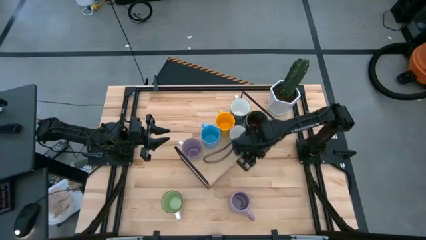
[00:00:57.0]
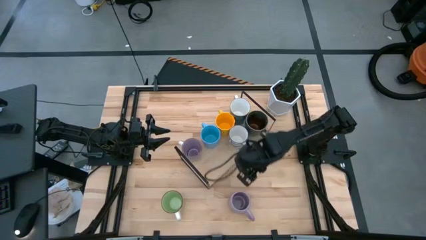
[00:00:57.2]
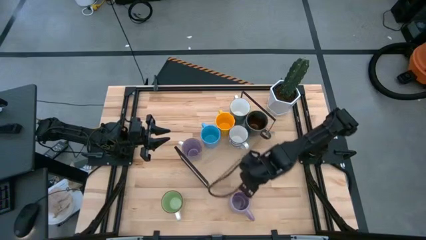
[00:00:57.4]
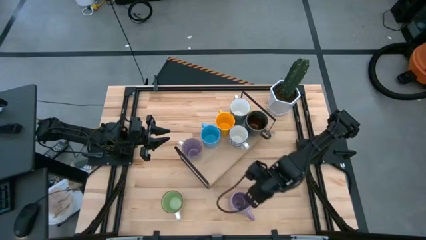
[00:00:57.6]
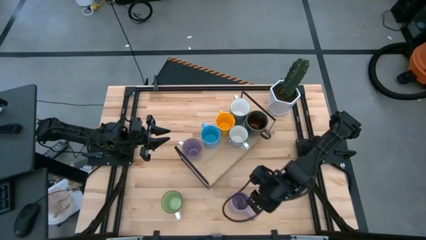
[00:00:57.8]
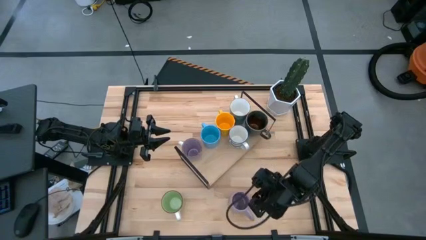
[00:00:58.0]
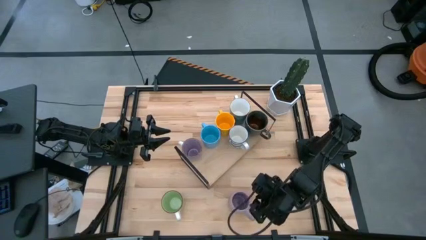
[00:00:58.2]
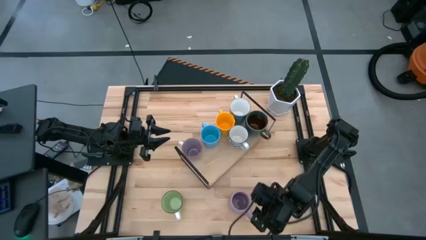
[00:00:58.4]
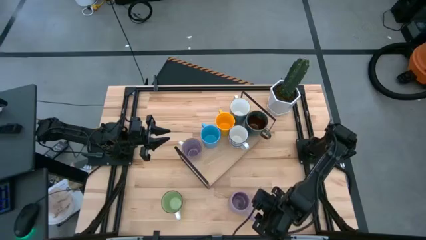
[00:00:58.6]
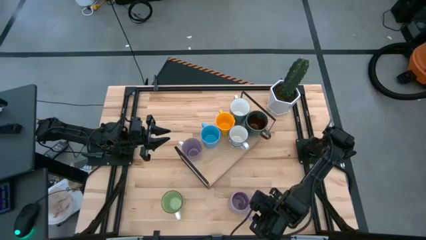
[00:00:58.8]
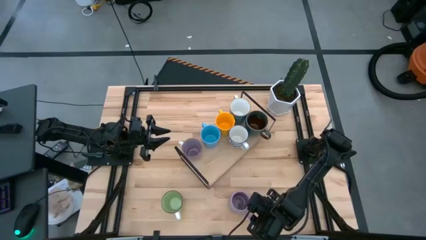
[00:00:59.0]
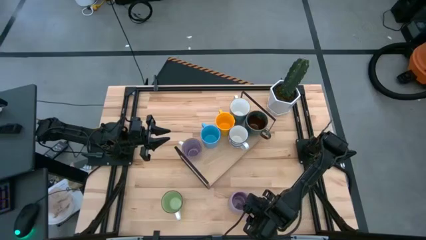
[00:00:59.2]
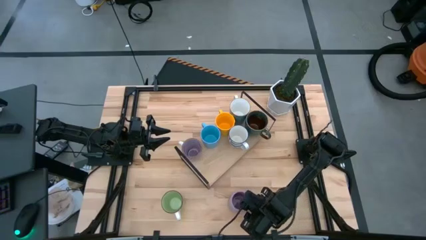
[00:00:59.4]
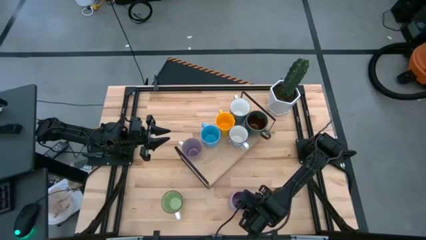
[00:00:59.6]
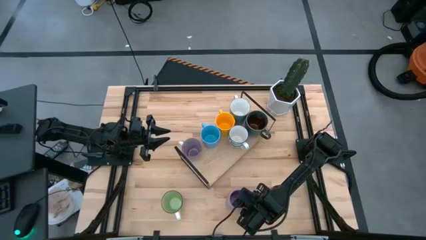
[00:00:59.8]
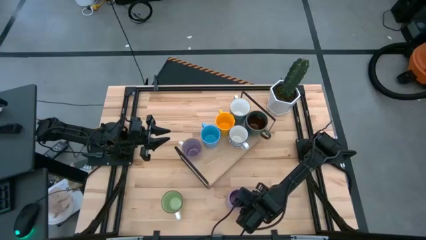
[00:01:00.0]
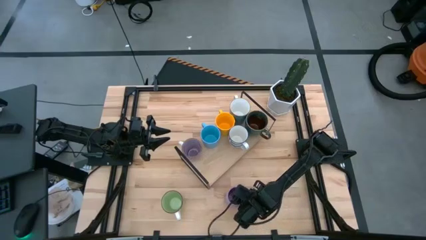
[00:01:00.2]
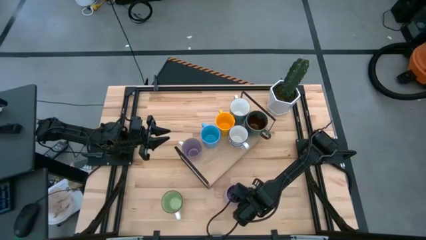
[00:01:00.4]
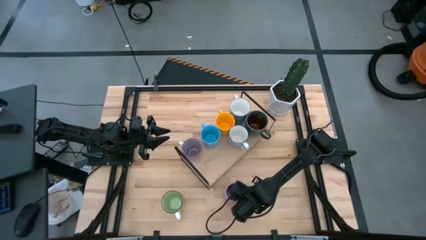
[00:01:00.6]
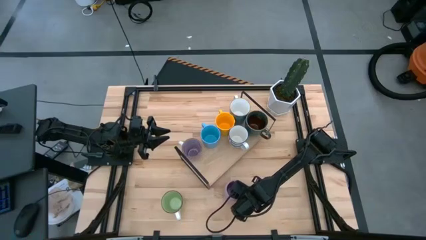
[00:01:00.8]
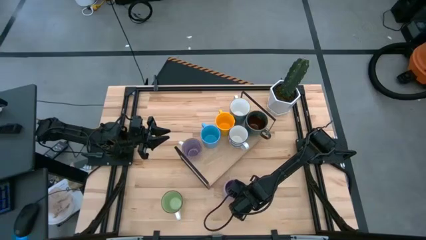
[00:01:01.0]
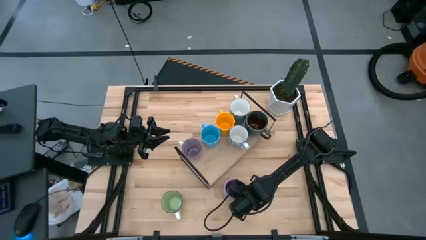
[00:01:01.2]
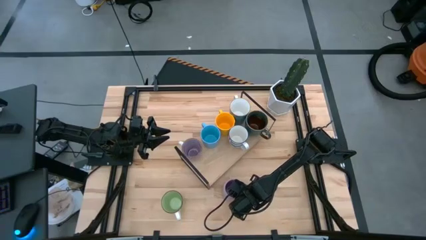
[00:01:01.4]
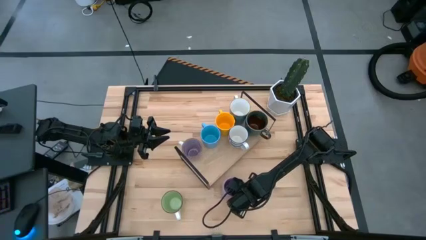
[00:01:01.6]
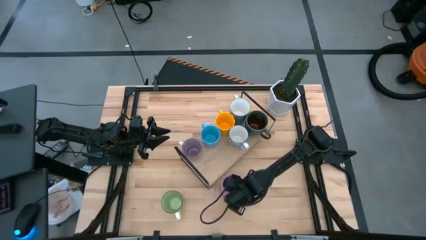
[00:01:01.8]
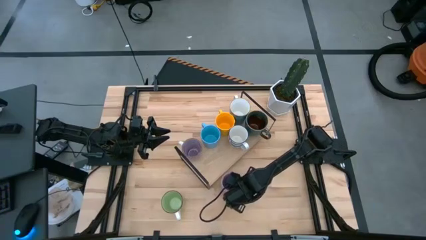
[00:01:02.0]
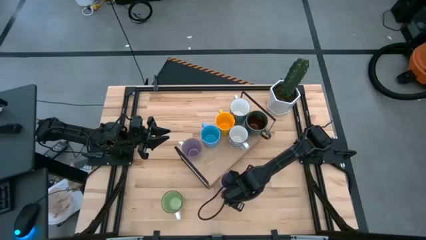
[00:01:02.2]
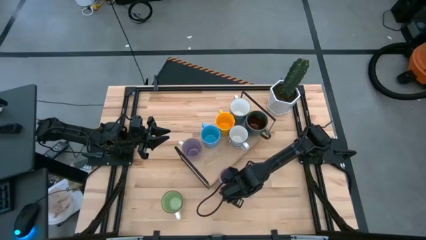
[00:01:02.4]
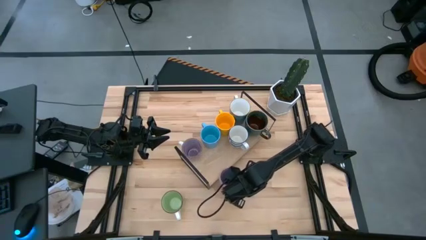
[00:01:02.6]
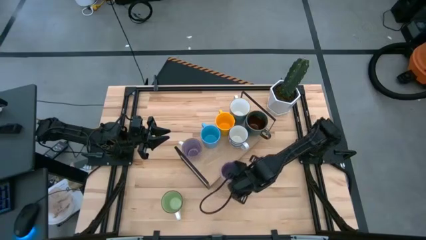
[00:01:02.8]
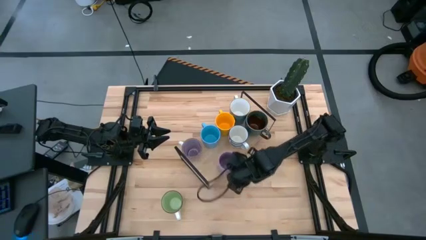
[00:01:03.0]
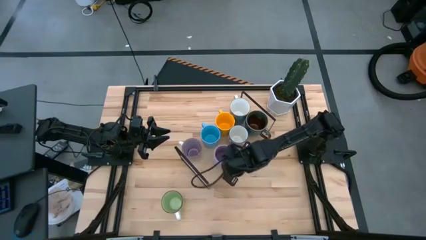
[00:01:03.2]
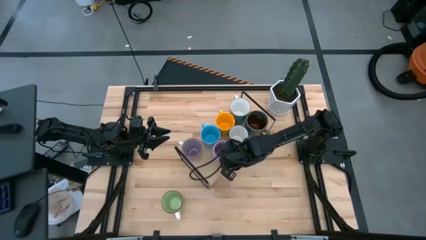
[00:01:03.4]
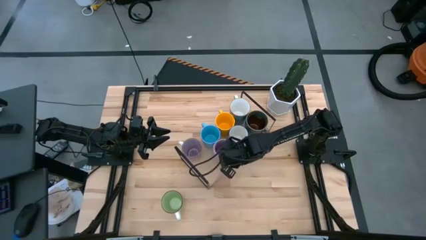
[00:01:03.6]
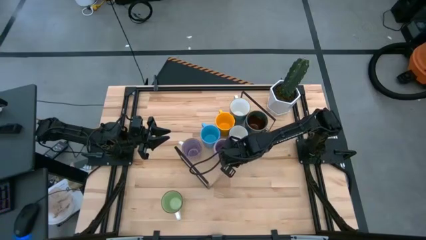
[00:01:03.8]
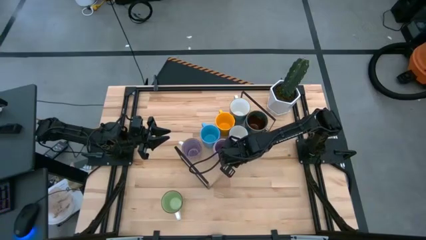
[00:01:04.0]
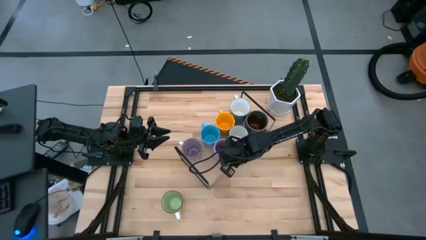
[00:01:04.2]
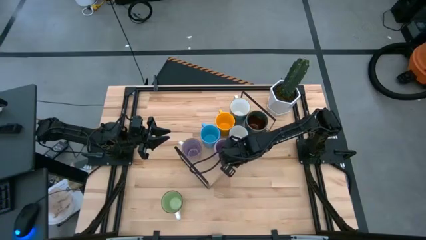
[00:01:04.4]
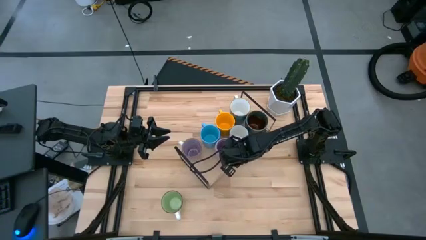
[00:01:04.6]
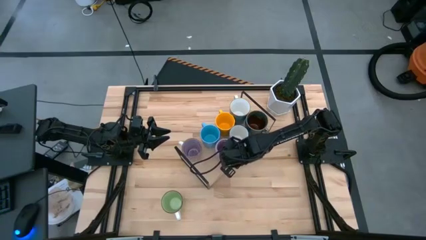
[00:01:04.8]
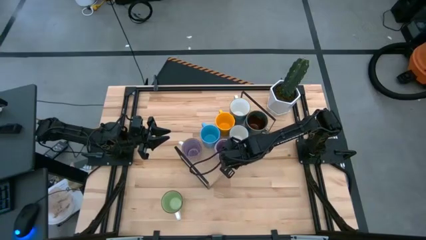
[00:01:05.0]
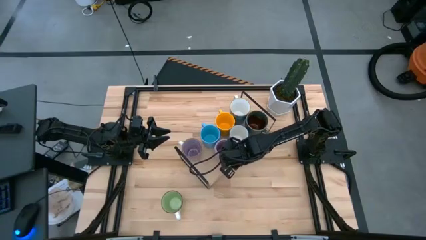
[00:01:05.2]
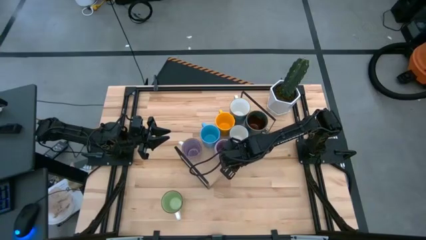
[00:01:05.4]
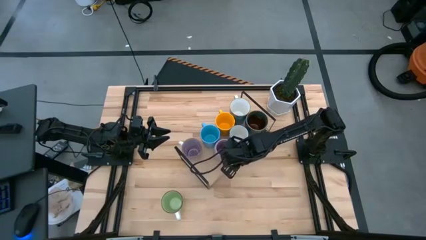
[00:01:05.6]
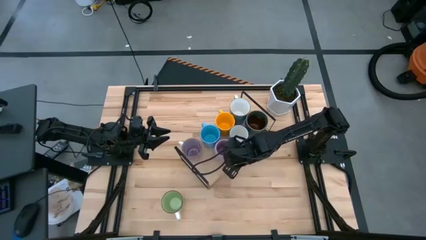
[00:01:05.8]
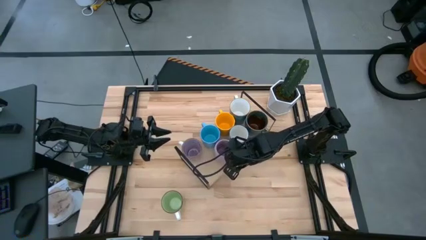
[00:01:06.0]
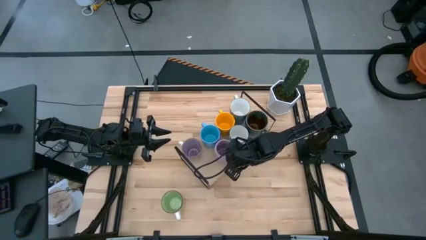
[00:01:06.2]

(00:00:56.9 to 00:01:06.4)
Task: Place coffee mugs
Put the violet mug on the shelf

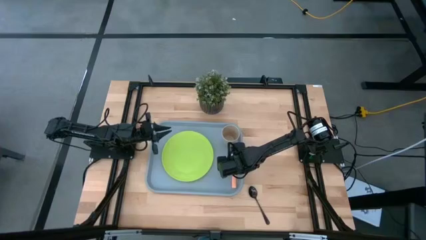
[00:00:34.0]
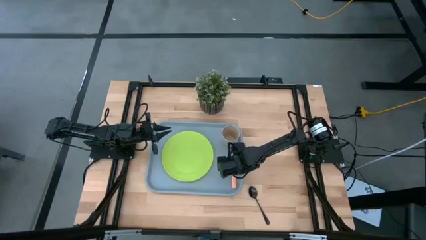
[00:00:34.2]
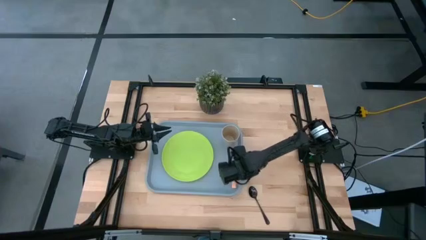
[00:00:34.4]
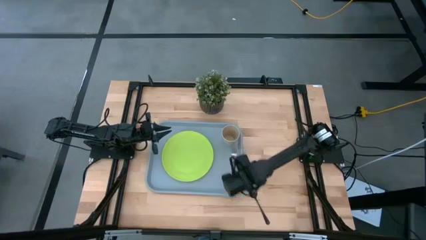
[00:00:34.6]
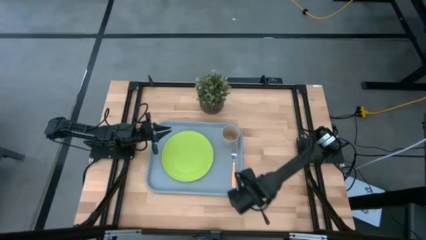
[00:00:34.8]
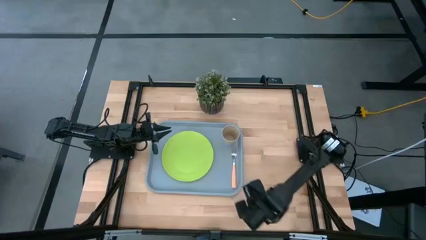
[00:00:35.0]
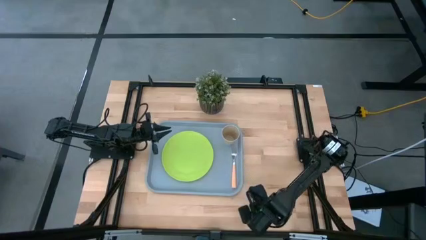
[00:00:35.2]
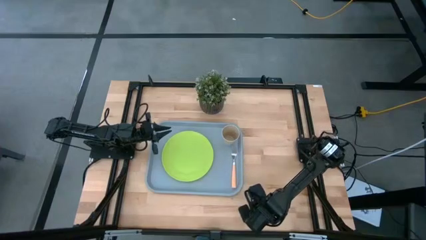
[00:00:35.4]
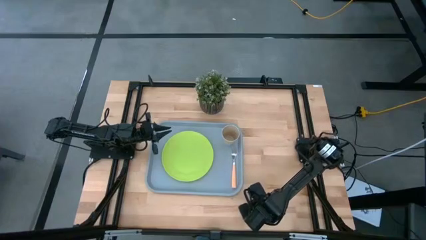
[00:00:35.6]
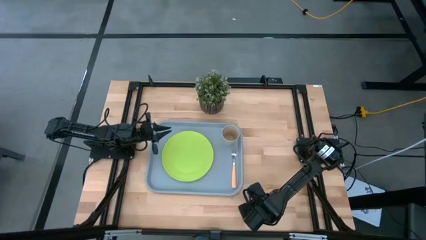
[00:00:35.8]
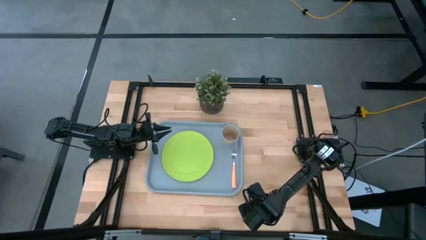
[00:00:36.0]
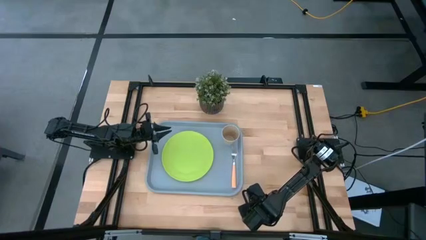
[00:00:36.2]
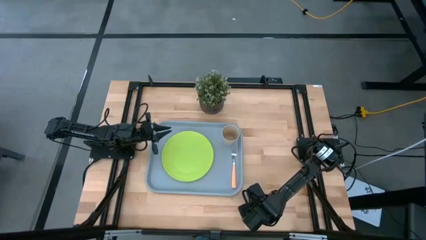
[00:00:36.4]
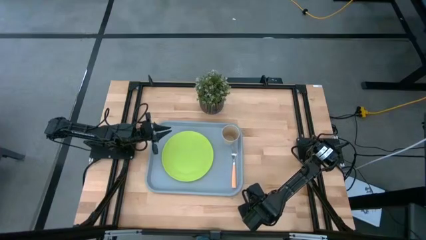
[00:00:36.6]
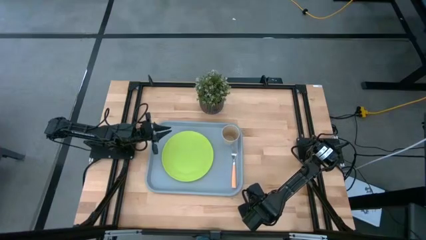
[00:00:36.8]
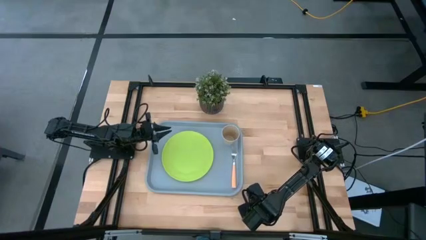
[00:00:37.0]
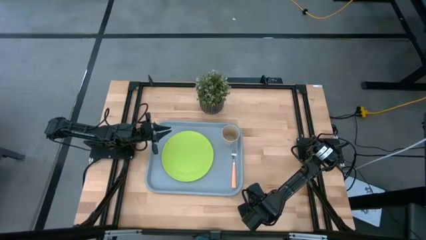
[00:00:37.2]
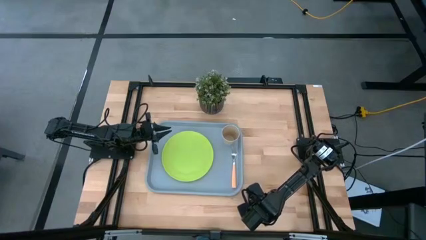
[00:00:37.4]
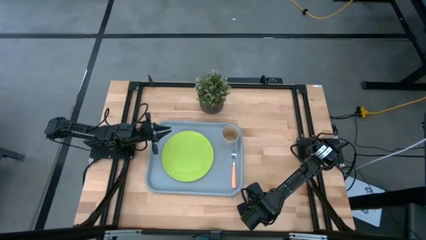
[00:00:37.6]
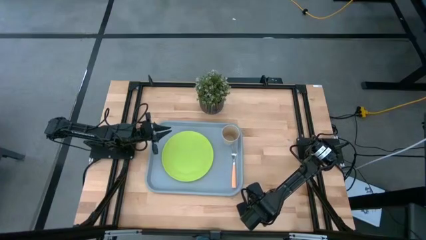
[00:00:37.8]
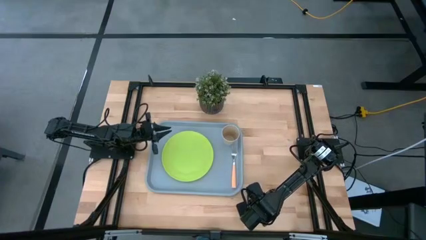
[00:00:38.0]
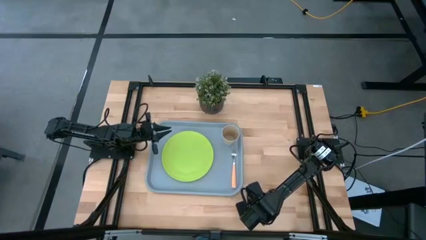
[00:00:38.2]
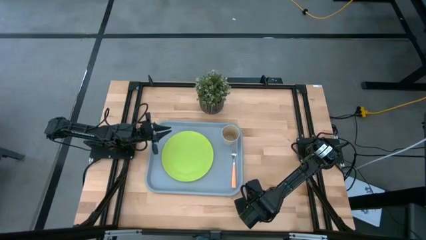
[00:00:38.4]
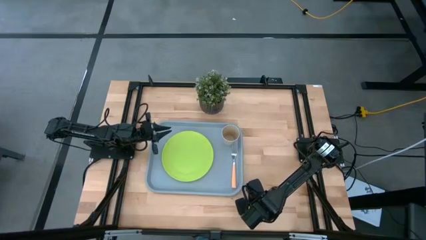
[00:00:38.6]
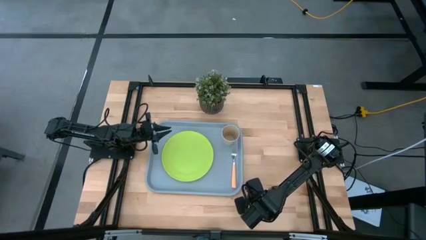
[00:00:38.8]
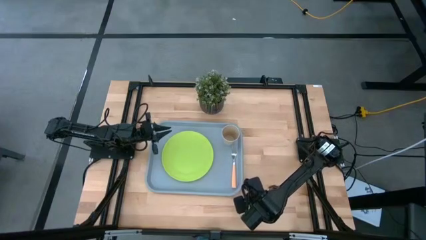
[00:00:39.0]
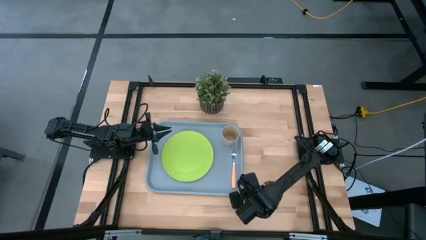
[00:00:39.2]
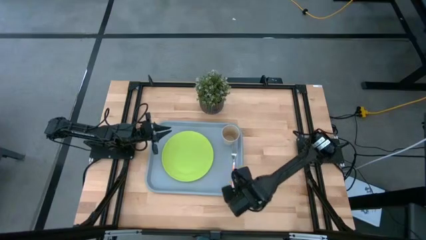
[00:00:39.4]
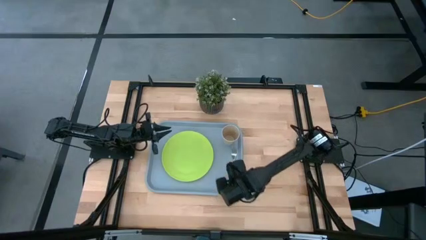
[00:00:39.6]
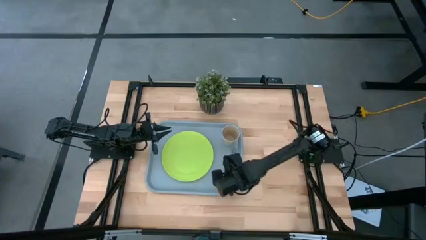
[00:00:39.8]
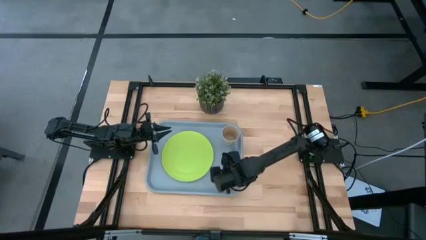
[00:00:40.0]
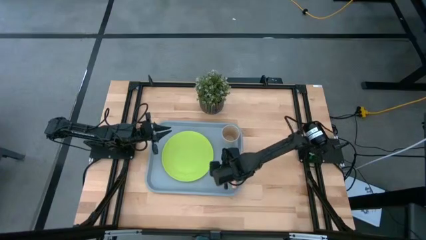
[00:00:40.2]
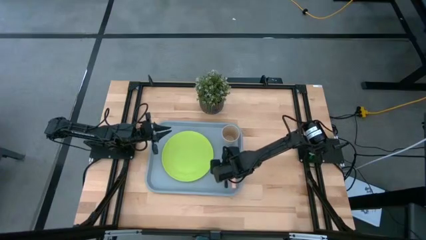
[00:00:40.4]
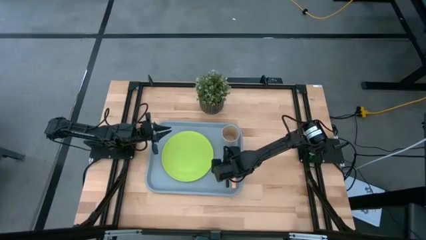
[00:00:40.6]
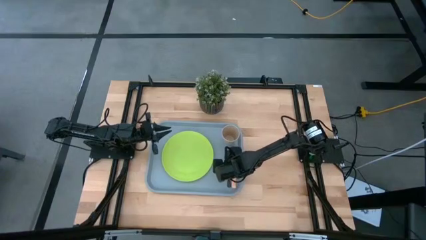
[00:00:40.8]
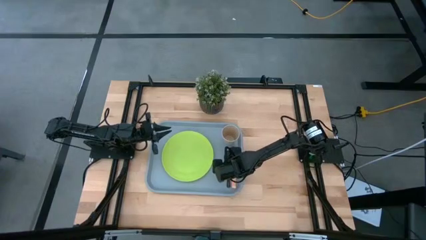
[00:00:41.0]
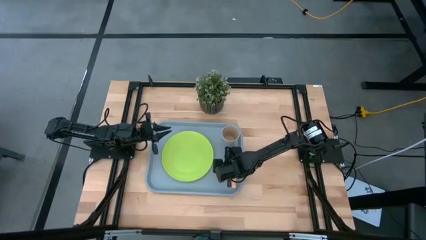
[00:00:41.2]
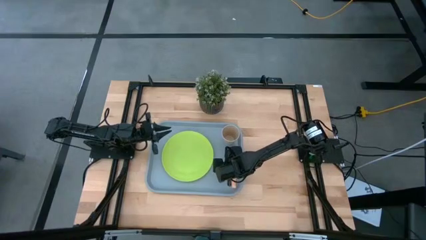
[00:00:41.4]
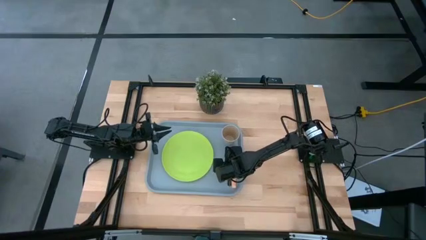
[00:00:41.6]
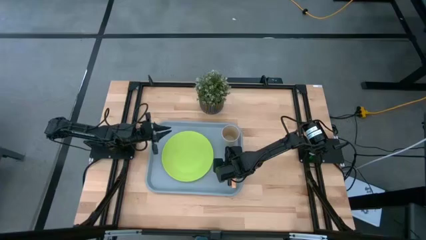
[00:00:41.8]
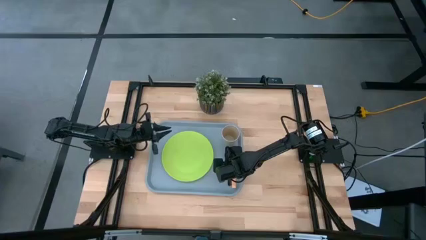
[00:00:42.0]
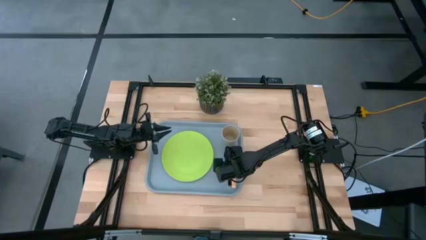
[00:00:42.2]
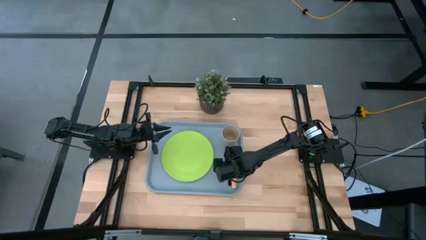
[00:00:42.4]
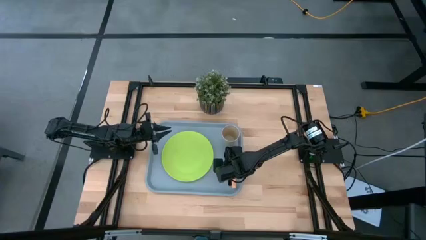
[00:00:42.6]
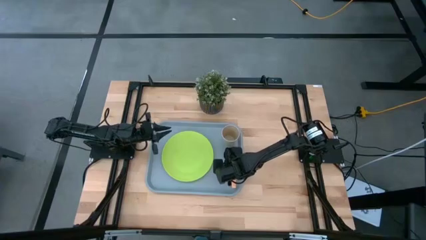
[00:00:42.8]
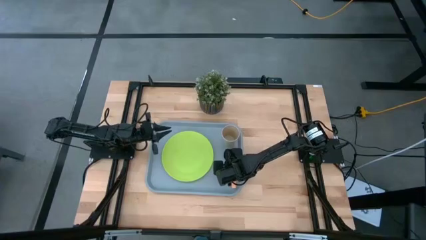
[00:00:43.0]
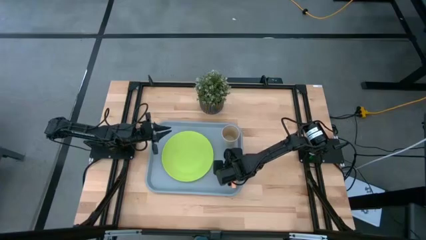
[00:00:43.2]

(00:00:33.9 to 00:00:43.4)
Task: Pick and place plate/cup/fork/spoon on tray
Put the black spoon on the gray serving tray to the left of the orange fork
